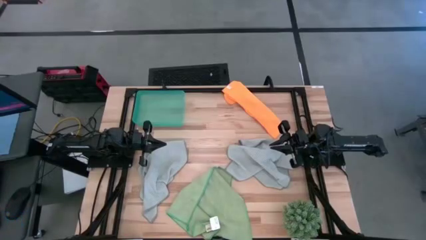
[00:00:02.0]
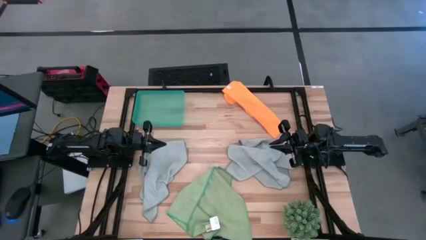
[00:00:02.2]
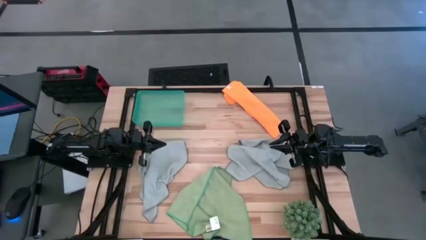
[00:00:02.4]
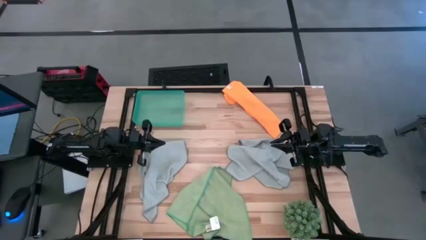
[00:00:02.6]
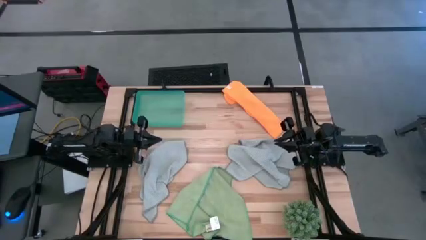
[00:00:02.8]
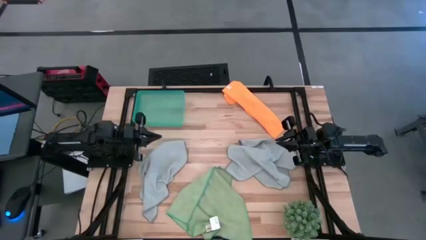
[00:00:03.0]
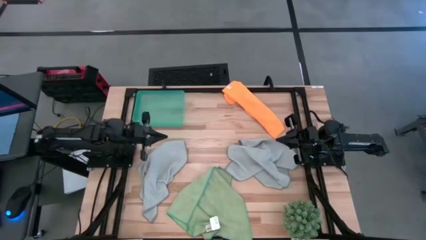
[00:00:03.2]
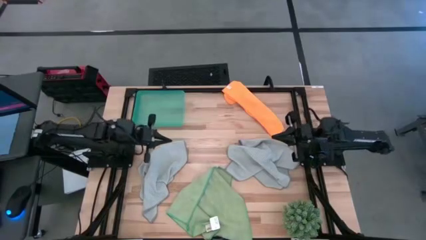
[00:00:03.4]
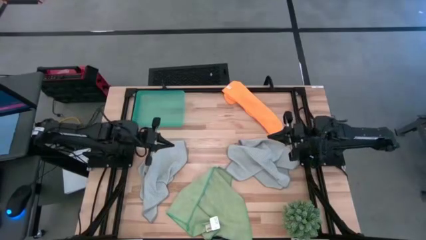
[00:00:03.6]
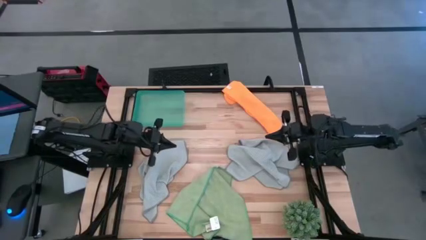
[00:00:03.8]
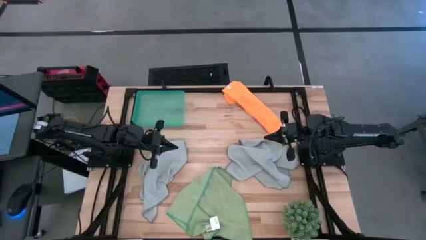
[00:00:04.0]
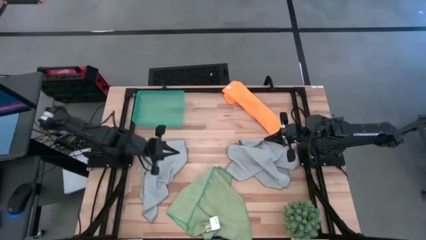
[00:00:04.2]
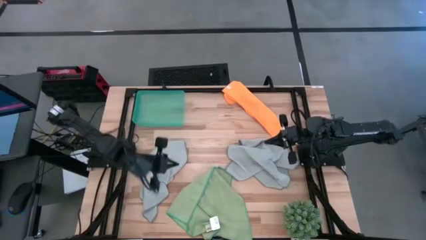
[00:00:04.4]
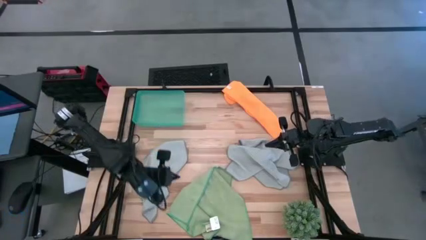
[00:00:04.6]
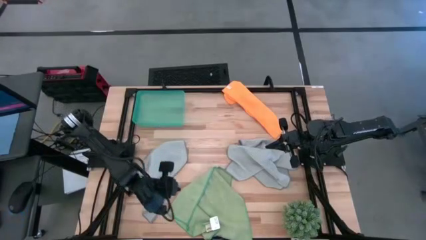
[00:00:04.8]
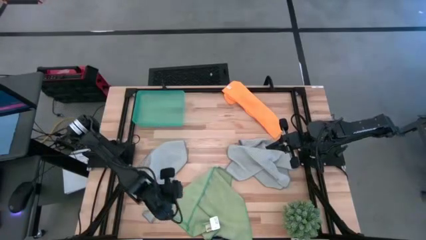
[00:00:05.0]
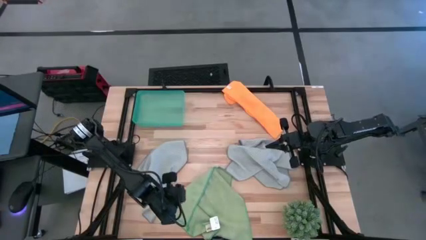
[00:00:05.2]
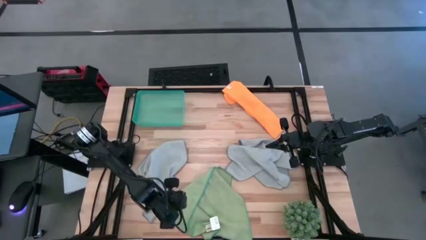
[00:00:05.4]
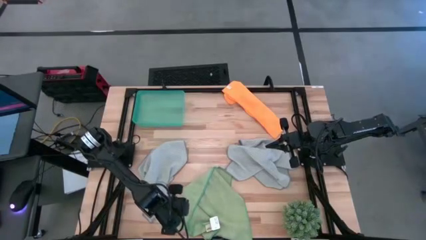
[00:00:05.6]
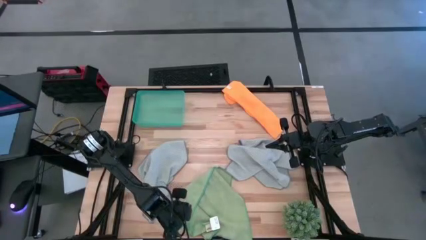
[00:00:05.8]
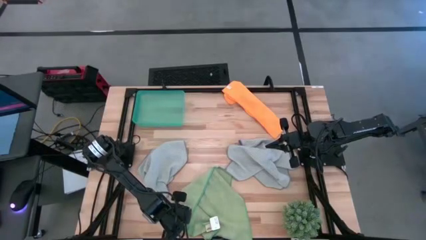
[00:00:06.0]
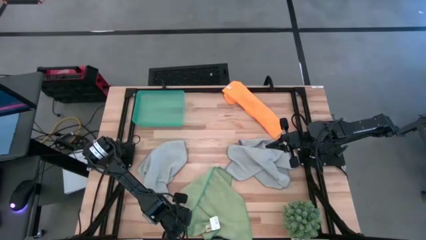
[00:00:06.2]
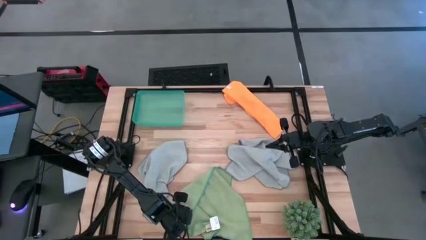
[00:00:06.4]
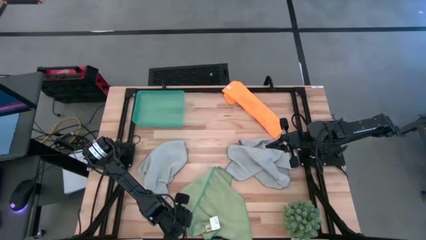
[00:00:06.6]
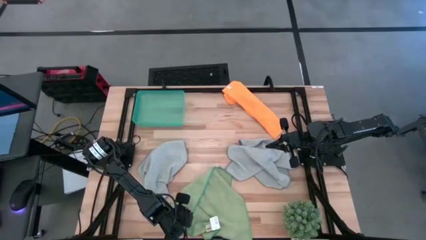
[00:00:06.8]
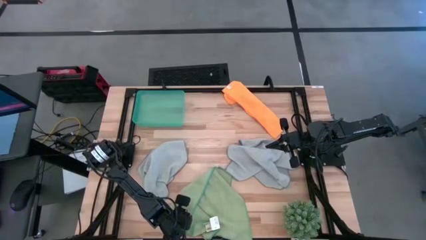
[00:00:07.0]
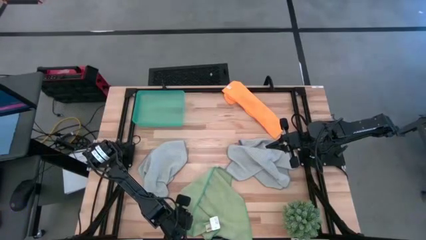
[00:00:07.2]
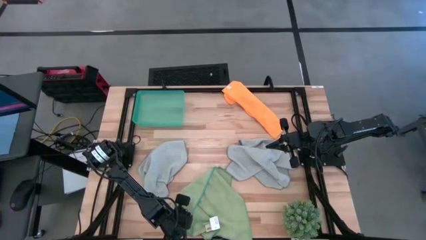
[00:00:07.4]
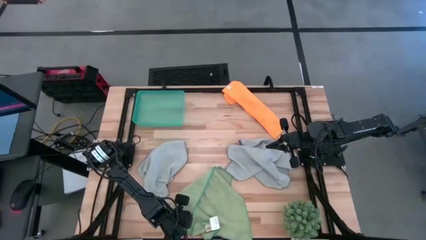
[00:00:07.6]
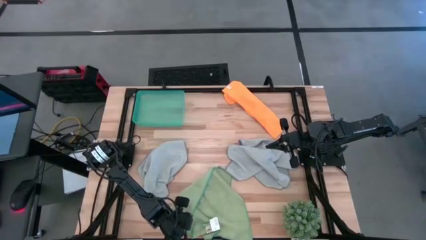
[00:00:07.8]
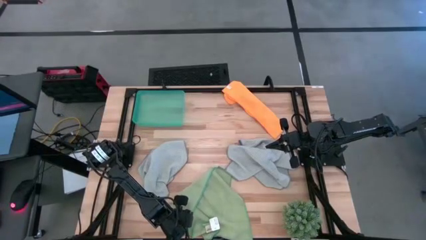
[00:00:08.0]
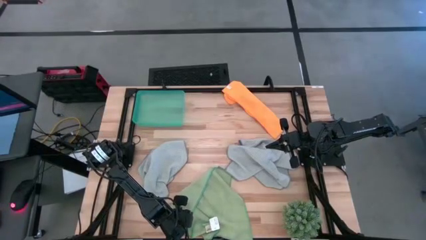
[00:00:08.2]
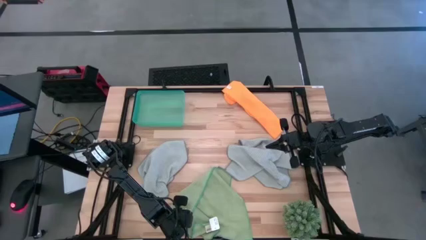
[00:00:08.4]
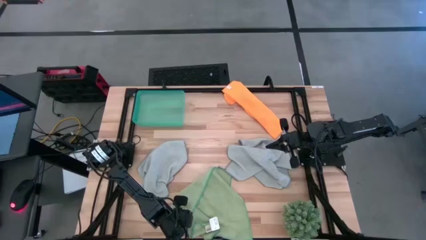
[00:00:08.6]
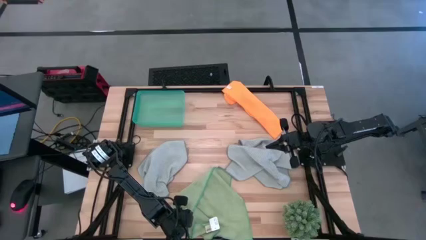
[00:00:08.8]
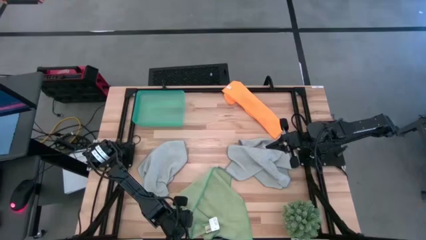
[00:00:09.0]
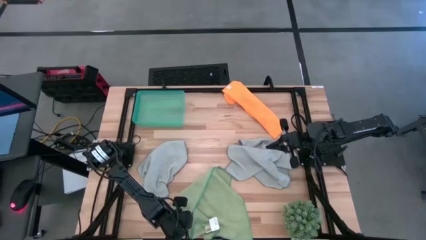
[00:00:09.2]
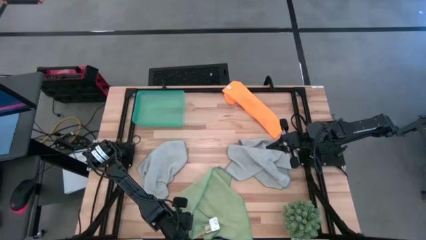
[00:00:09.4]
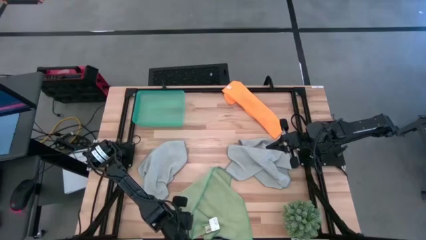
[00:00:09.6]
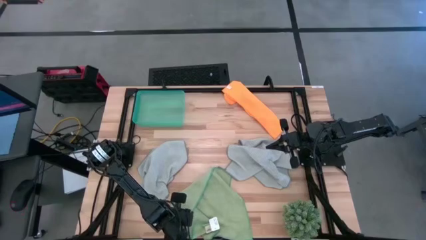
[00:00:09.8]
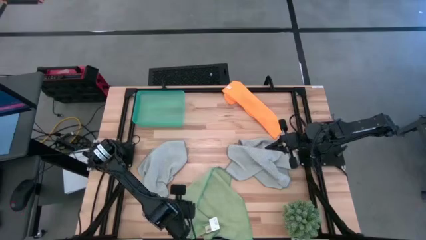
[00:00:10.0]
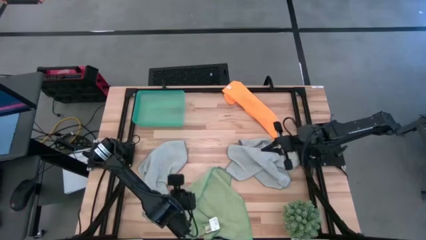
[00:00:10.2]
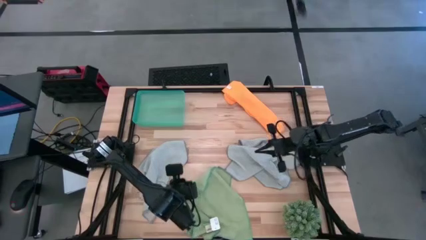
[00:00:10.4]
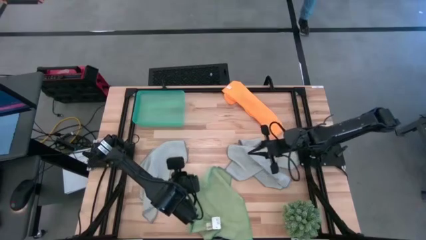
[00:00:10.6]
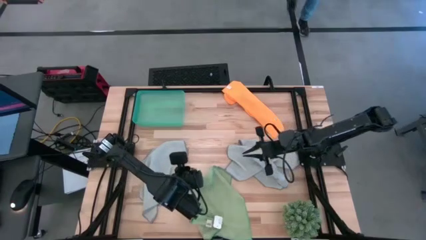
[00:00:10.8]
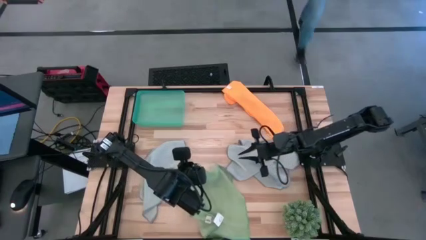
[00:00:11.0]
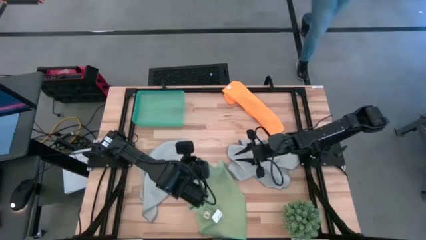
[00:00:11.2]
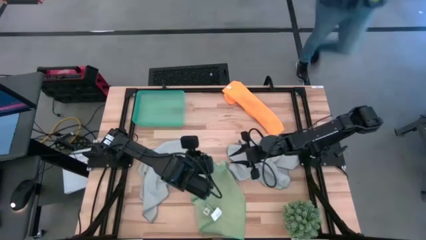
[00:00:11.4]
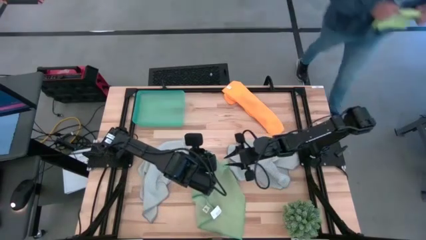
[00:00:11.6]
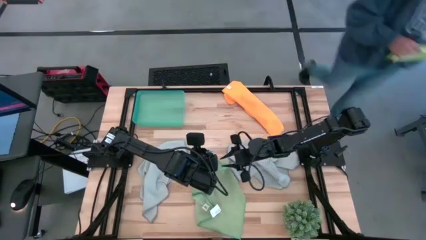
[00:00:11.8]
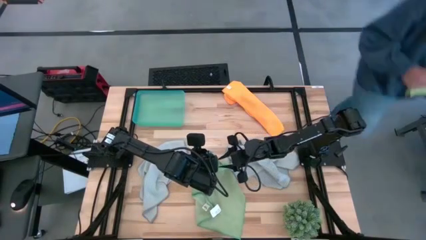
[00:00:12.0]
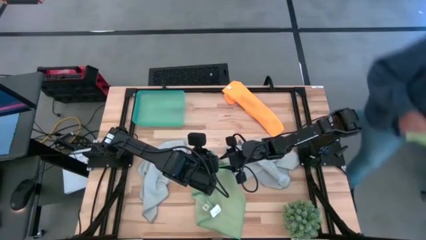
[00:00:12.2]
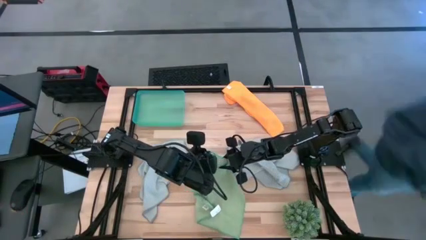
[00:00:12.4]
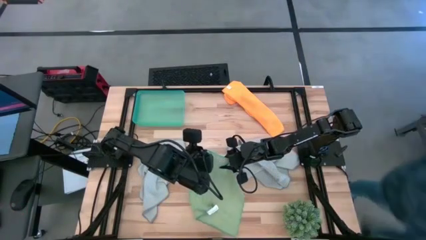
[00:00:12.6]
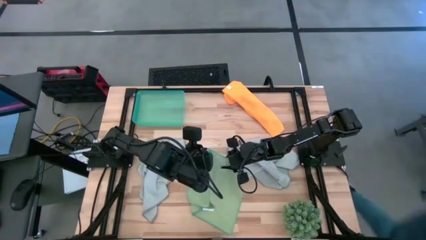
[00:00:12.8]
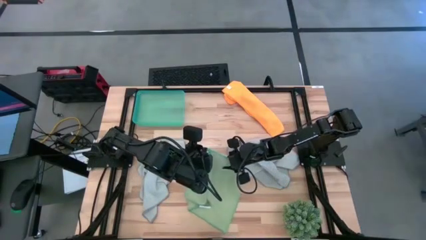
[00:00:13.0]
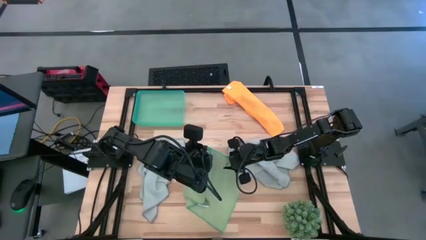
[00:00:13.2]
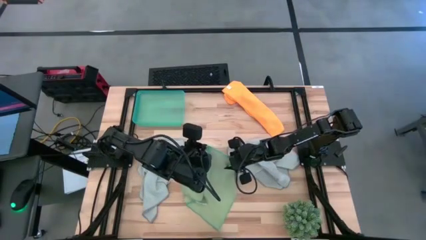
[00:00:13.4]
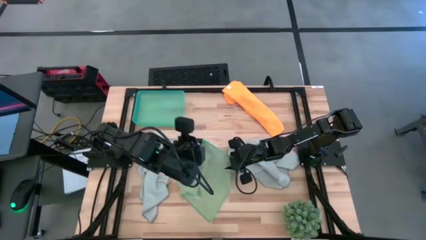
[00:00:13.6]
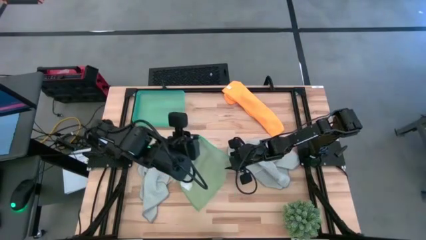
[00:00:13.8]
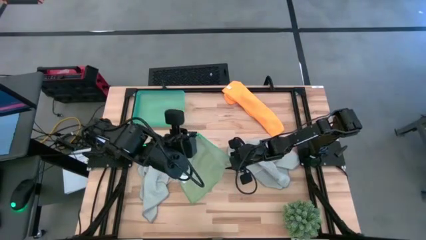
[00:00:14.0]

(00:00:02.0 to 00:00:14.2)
Task: Fold microfiber towels
Fold the green towel
